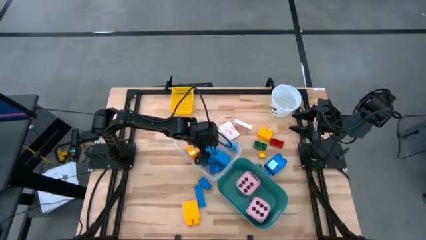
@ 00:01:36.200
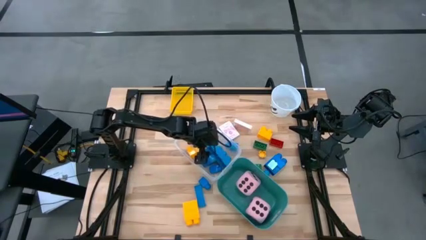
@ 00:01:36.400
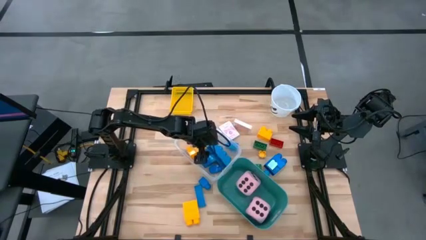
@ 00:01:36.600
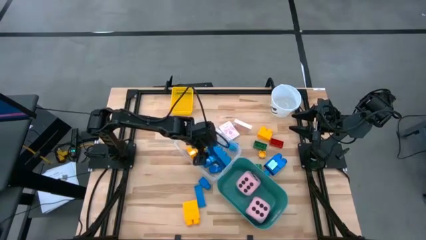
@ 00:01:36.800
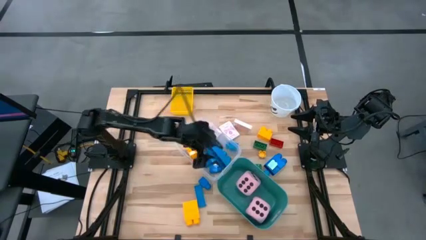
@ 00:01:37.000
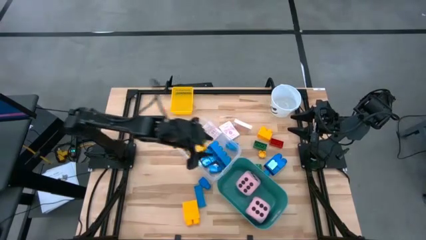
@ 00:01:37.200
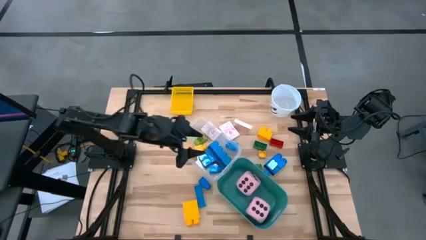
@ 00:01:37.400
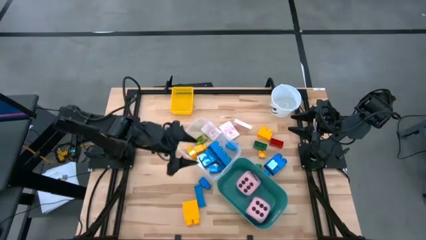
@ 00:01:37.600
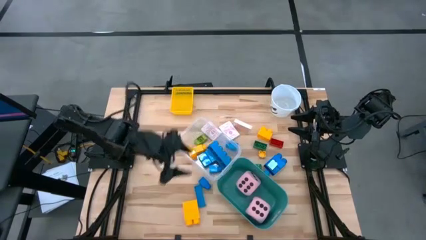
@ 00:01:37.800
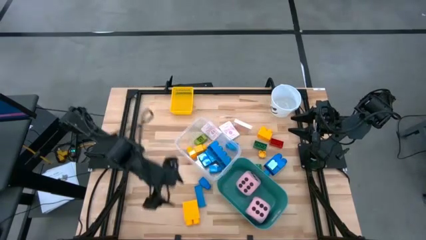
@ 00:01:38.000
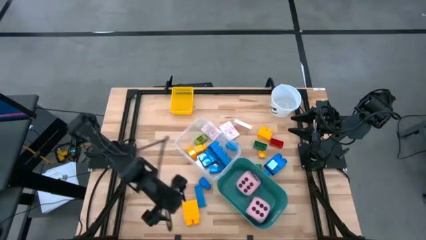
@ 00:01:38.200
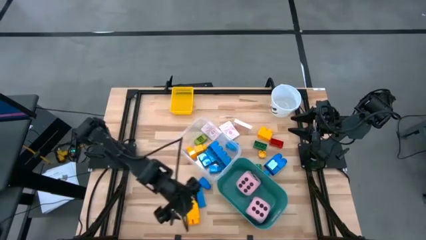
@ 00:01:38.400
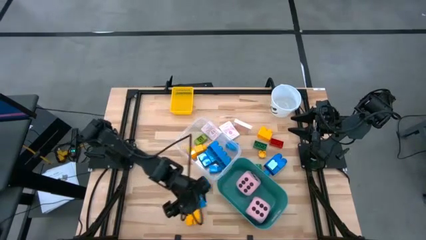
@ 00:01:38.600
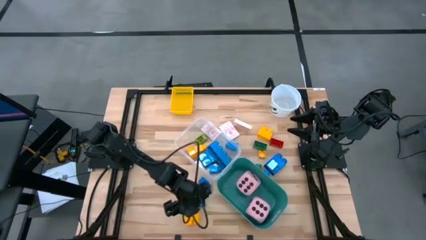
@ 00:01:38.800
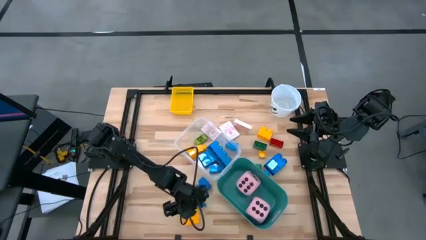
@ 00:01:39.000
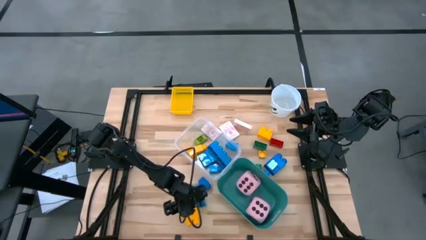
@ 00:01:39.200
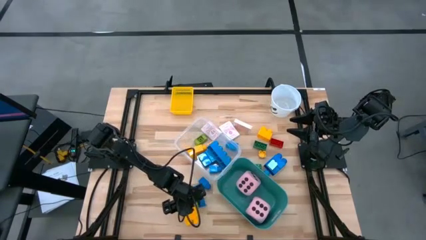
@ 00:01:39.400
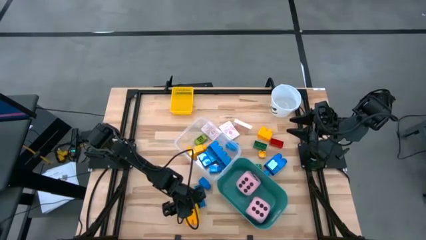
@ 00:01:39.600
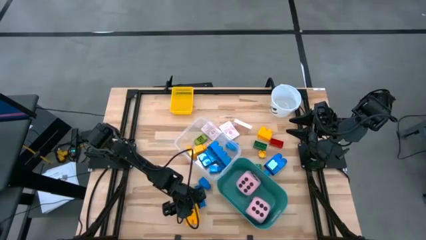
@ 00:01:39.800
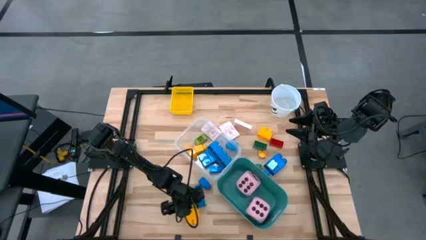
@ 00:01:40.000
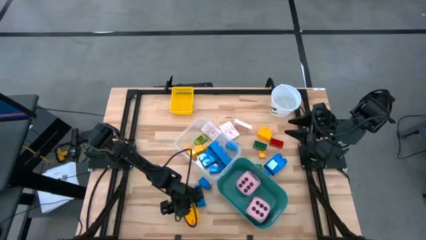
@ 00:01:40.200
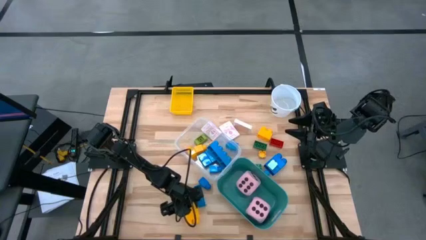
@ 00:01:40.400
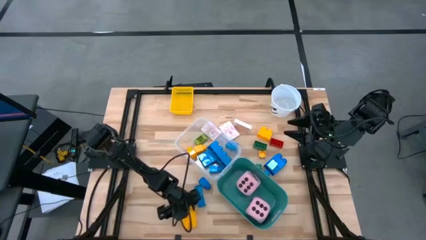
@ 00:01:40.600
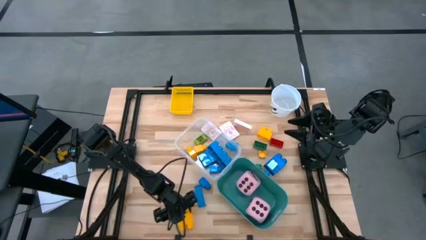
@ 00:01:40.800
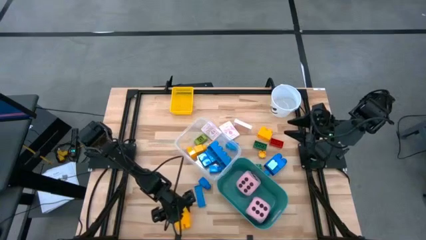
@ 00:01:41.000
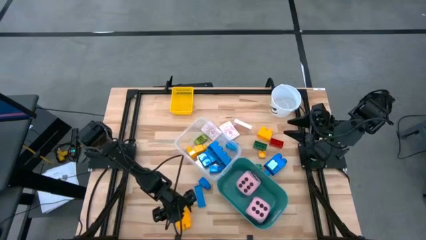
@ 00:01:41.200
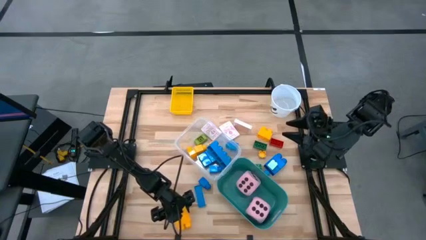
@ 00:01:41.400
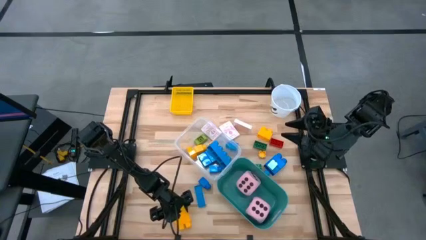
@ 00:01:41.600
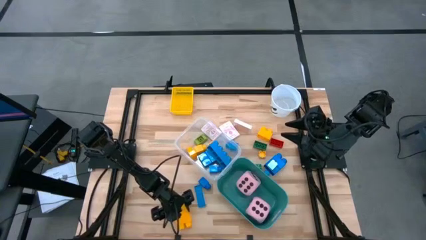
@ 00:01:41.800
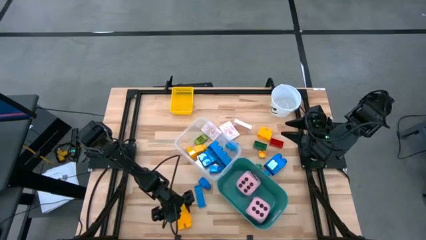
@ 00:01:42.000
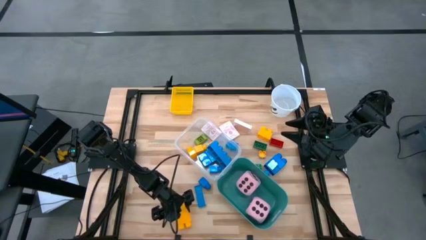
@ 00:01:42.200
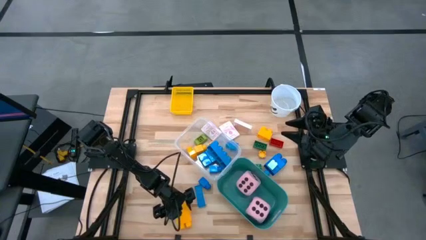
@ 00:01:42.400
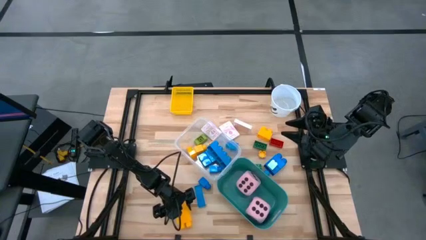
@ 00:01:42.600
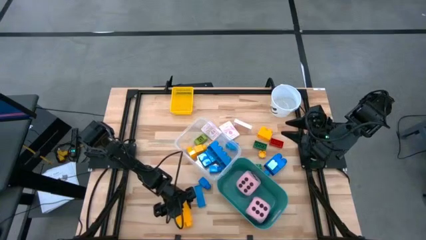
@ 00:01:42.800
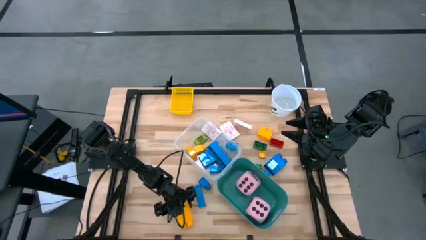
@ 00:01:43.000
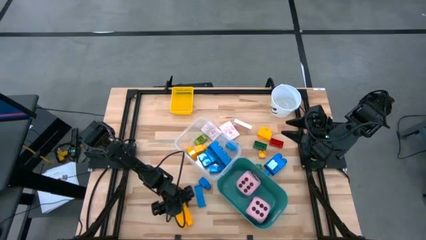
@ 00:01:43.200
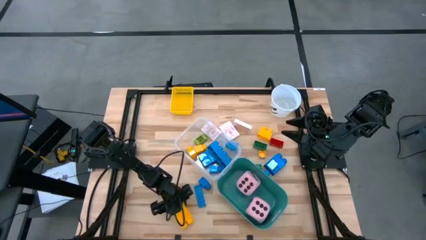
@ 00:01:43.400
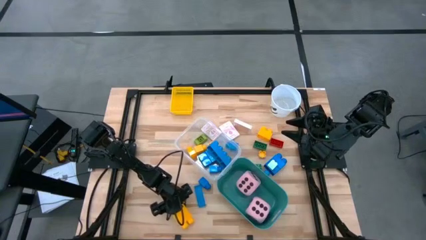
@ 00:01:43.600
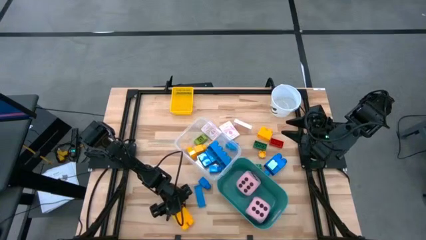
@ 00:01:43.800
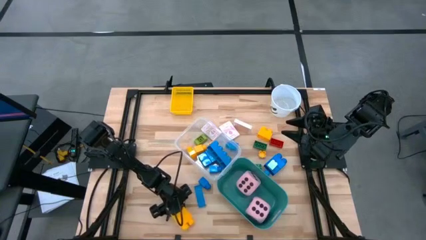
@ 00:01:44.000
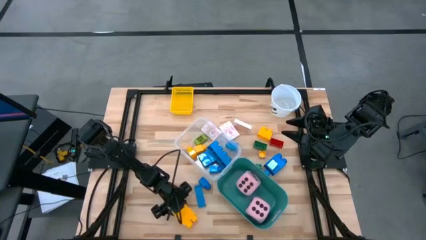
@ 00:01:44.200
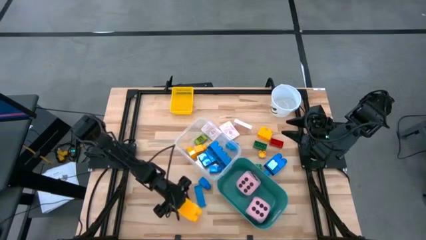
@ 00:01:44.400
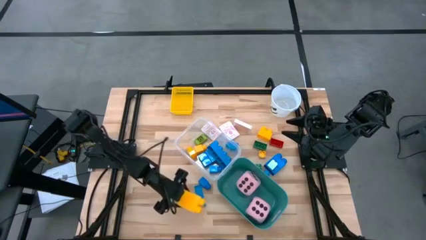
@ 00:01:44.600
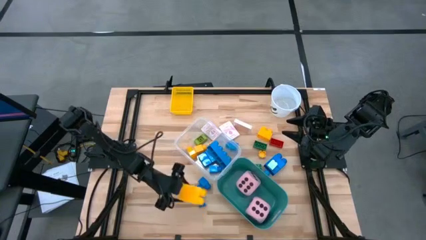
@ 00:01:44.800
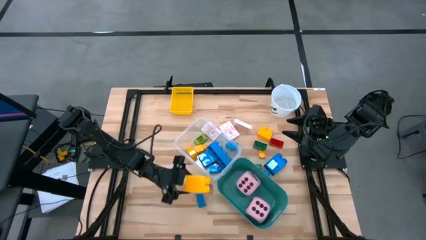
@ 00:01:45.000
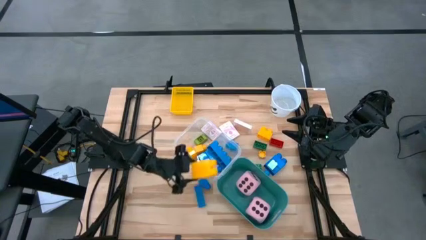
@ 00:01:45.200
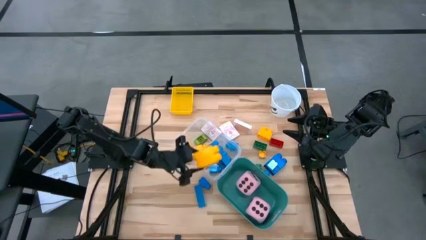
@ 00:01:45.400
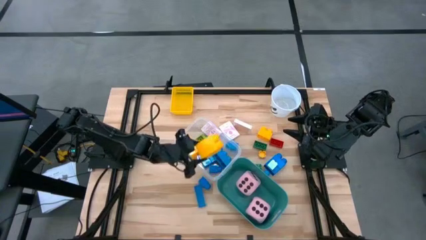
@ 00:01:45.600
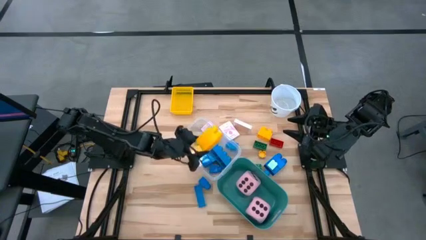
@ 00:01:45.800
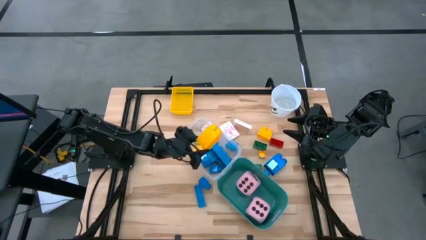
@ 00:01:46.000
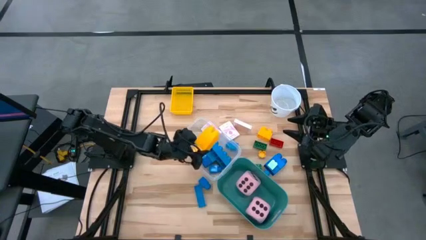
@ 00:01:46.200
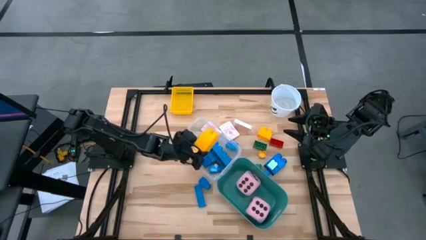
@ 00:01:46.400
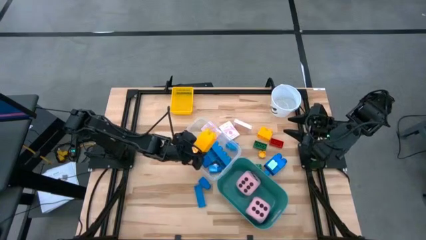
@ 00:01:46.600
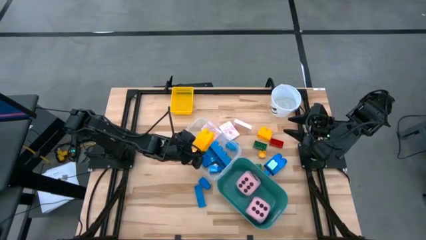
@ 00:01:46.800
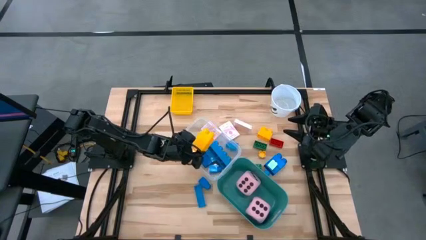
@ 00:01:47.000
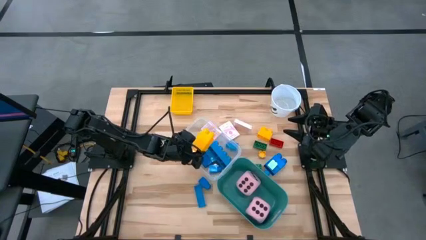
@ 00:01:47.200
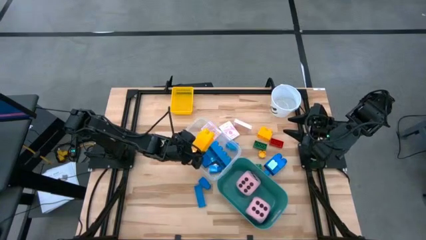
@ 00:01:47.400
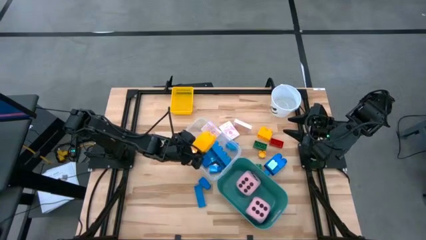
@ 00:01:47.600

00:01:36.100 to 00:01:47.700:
Task: Pick & Place Toys
Put the yellow game pieces into the transparent bin
